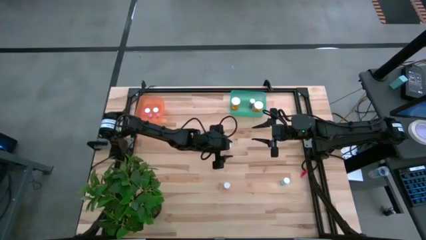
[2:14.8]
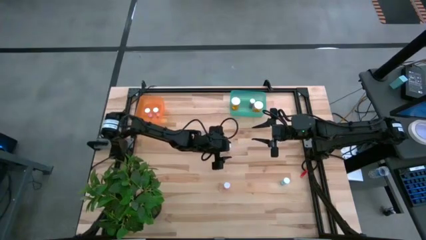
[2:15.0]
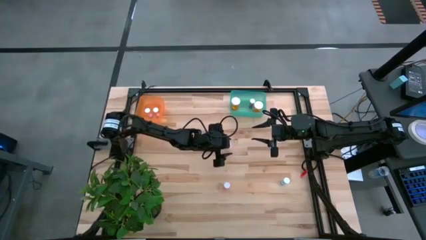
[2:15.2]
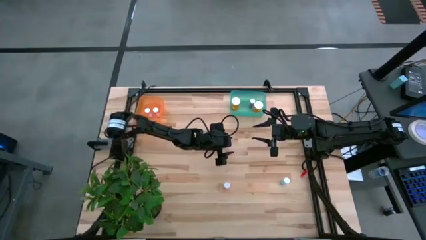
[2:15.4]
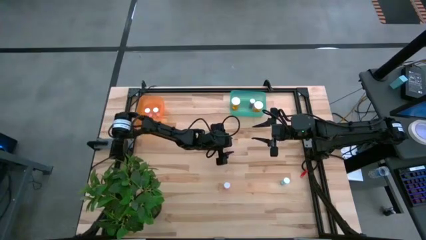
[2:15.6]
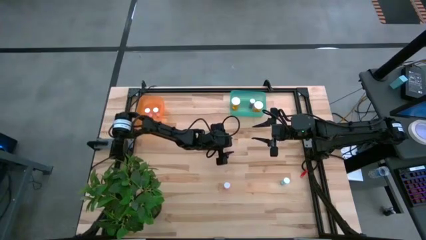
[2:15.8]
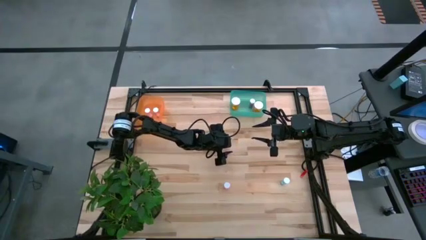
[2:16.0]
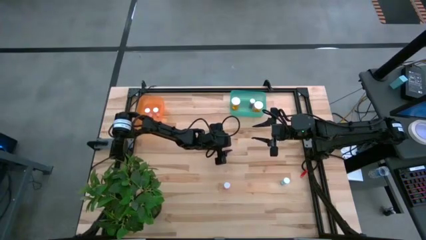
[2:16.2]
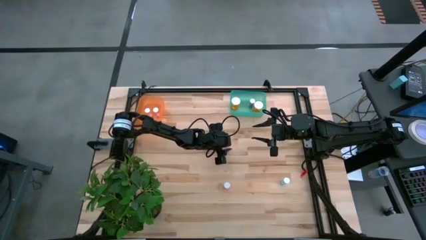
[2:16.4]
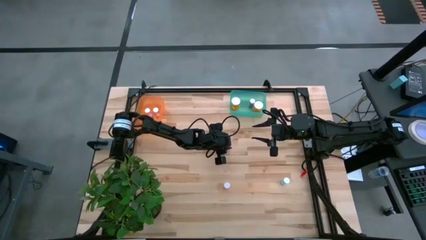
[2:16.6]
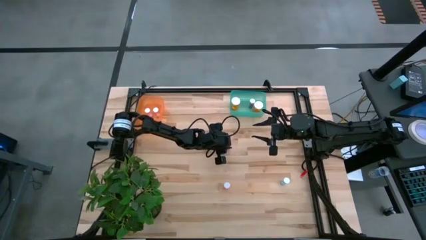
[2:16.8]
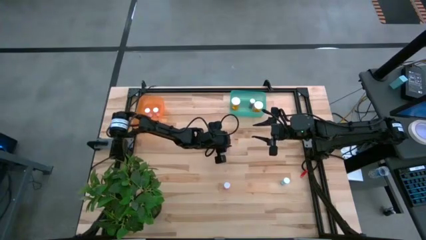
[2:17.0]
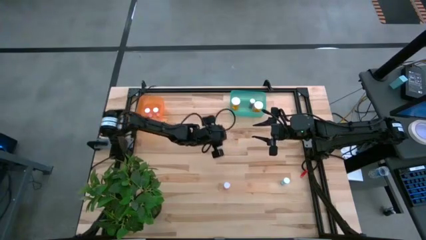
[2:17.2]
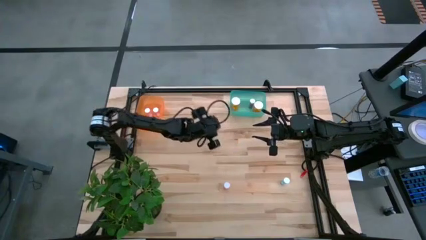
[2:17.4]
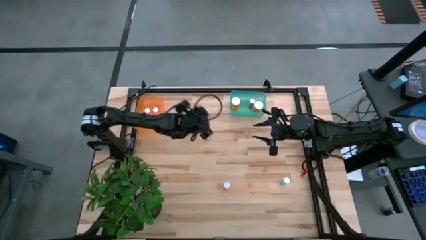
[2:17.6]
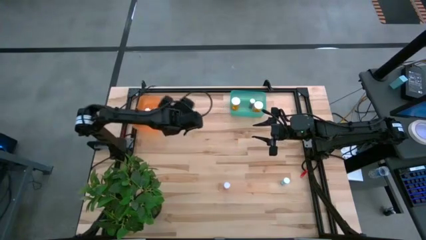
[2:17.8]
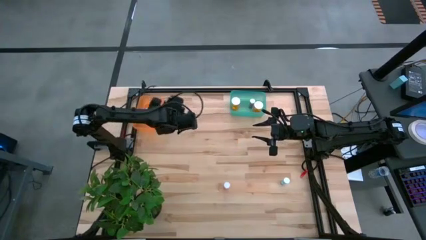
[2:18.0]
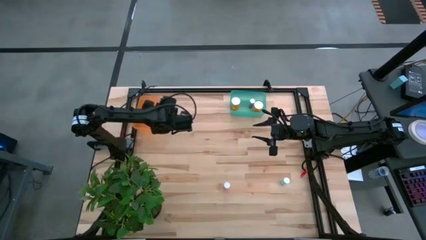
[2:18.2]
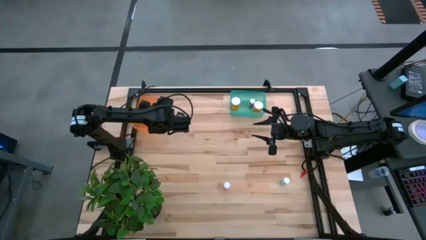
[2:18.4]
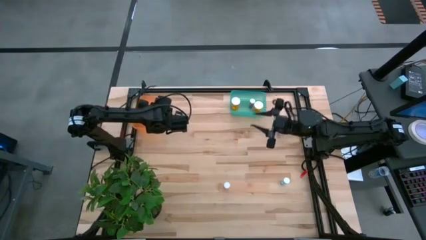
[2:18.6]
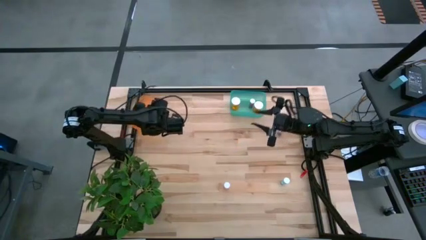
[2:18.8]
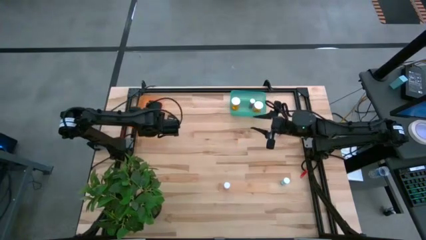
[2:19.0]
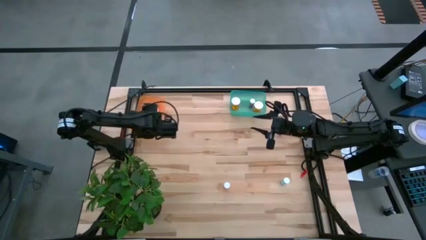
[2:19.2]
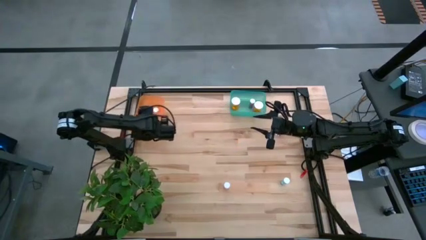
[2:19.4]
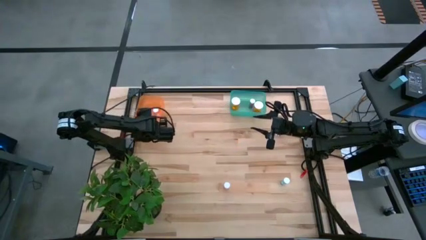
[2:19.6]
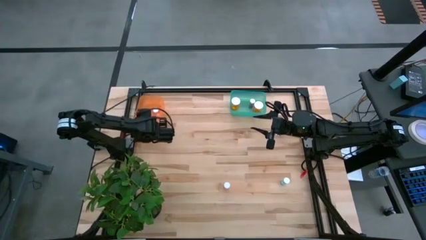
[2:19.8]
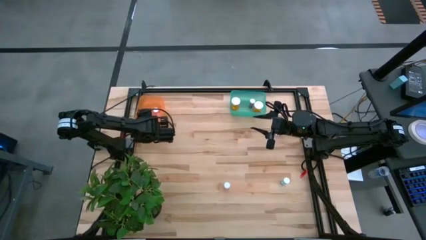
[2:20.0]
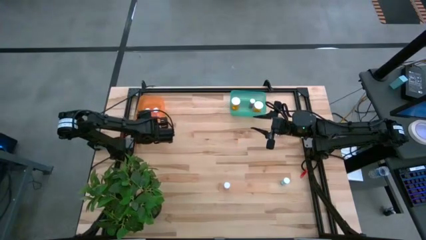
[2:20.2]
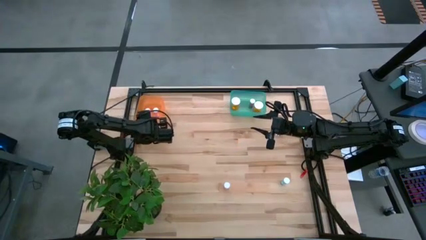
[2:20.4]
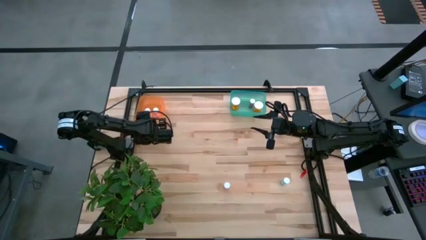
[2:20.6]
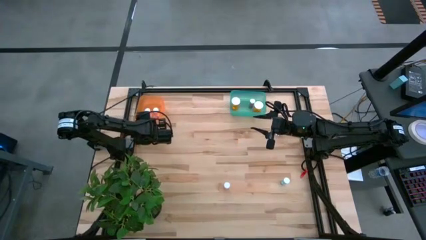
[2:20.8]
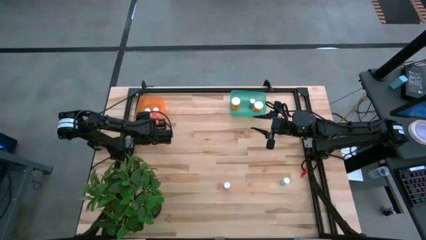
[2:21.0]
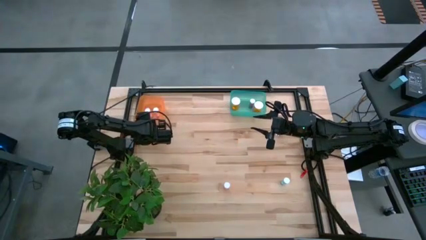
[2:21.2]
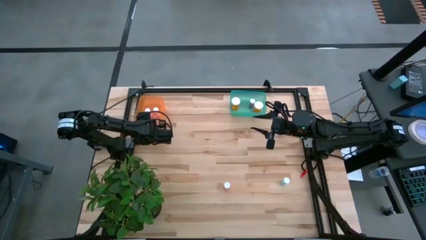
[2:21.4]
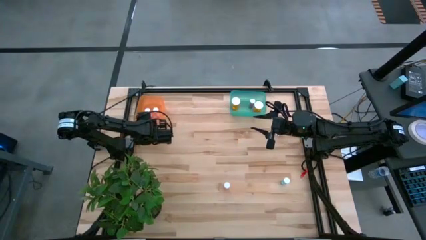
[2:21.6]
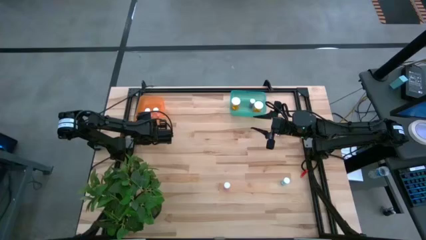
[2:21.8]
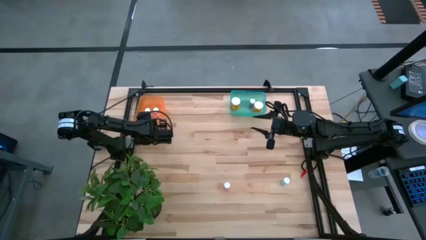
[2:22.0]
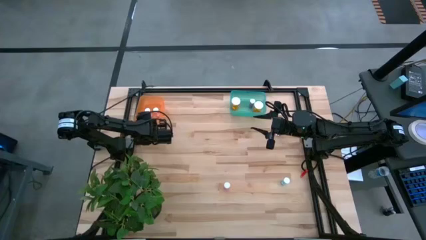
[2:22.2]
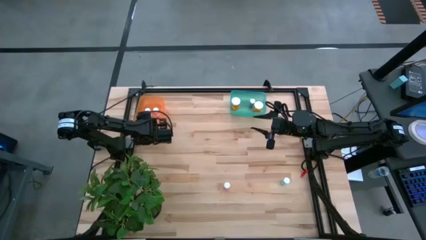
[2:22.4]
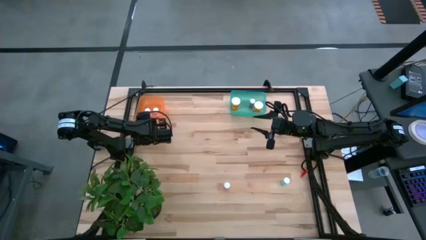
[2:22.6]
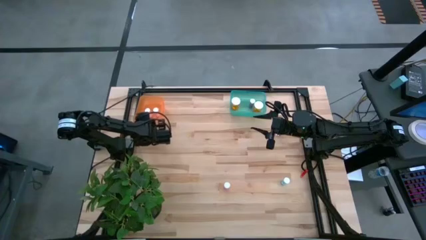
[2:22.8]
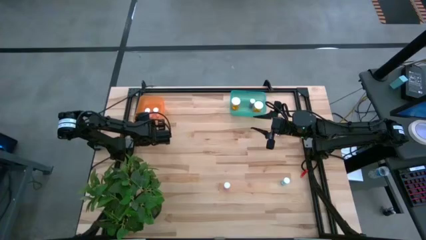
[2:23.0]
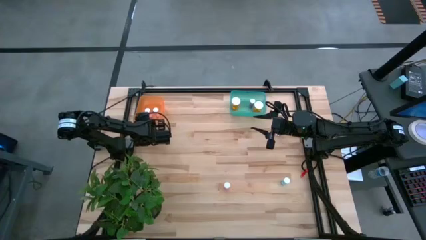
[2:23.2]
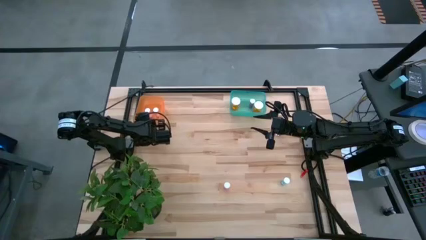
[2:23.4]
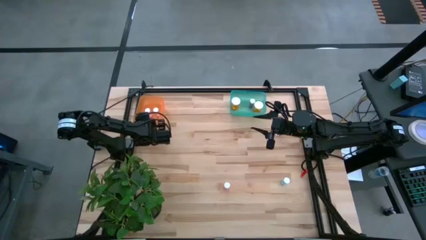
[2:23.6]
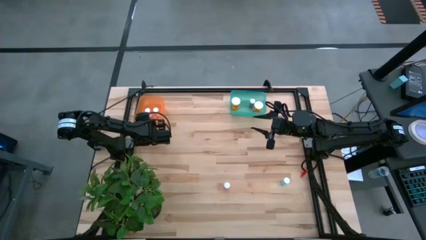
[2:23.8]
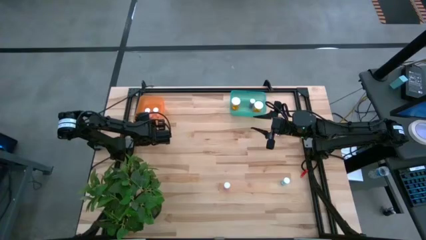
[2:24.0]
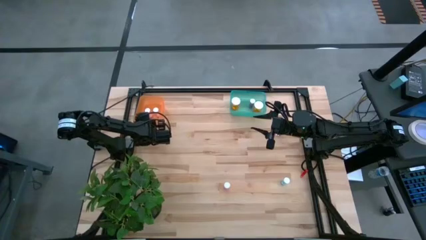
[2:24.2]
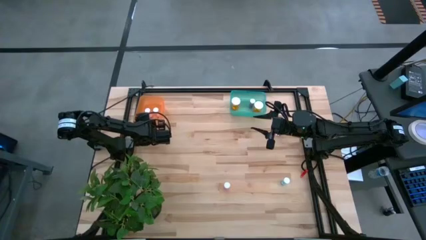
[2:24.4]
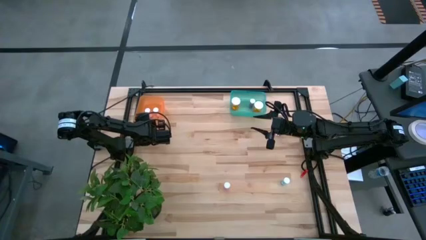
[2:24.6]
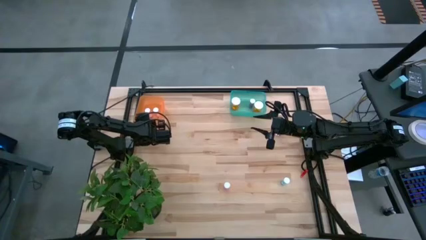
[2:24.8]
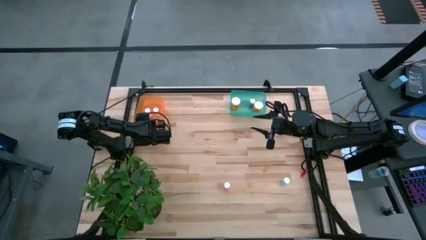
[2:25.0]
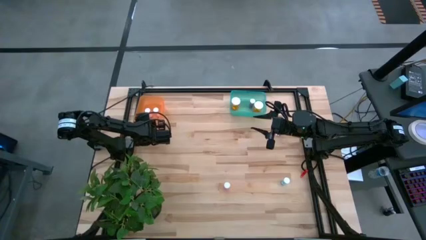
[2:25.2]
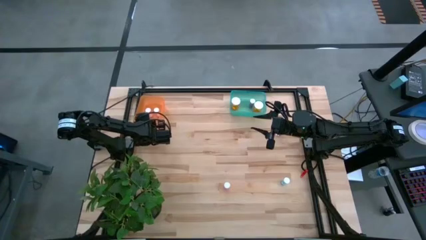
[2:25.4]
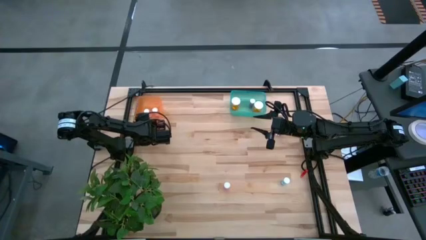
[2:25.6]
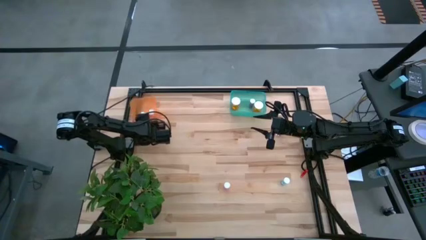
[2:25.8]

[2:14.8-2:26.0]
Task: Pick and place medicine bottles into bin by pill shape (circle, oval)
Put the pink tablet bottle into the orange bin

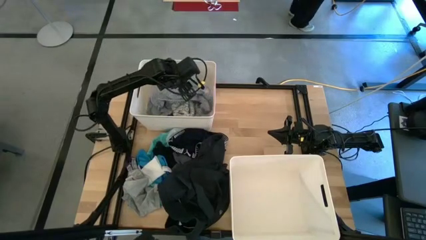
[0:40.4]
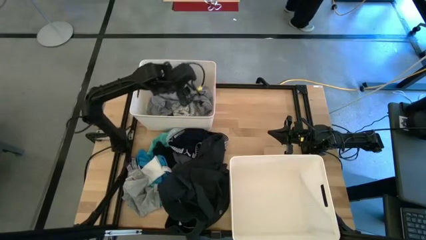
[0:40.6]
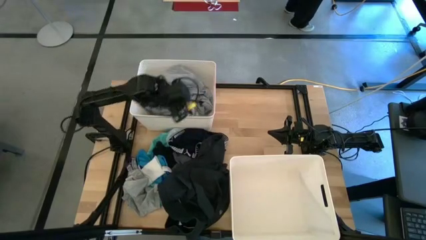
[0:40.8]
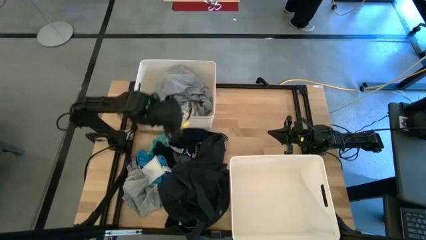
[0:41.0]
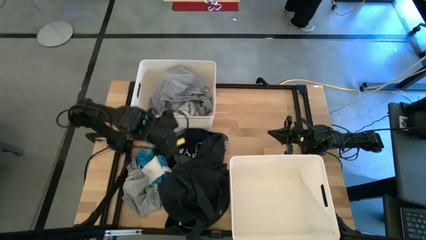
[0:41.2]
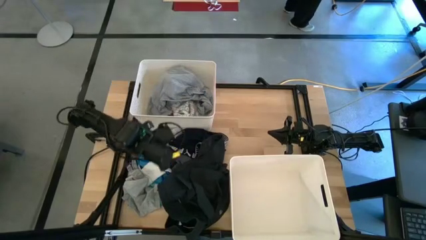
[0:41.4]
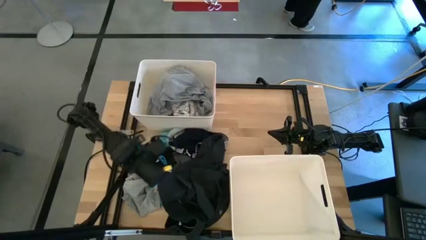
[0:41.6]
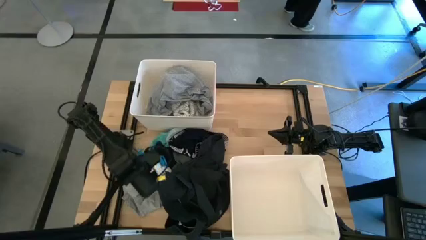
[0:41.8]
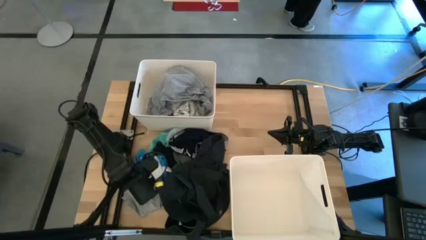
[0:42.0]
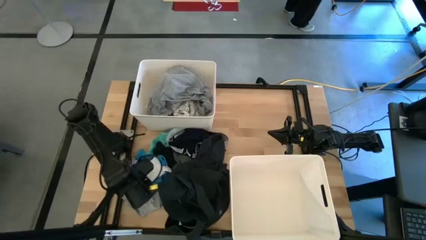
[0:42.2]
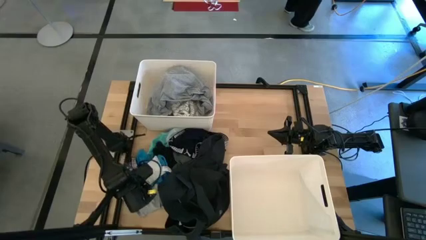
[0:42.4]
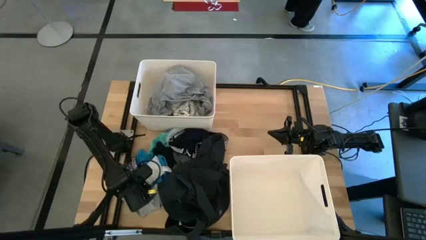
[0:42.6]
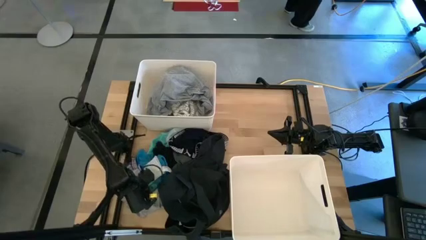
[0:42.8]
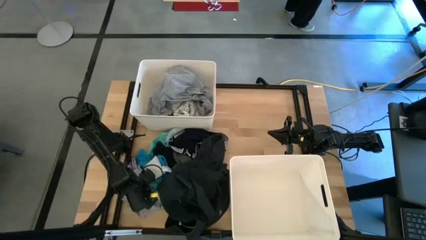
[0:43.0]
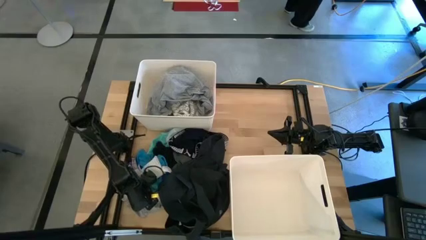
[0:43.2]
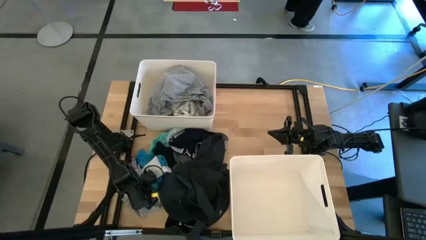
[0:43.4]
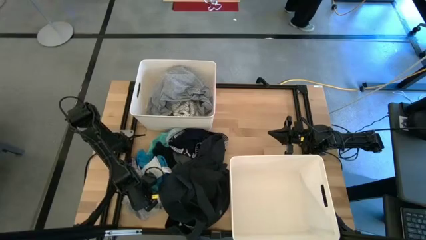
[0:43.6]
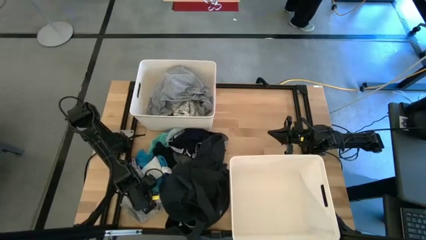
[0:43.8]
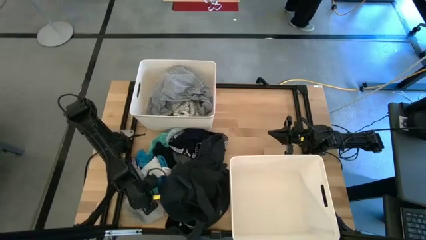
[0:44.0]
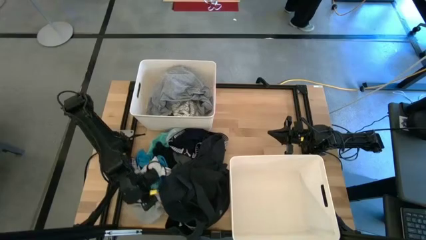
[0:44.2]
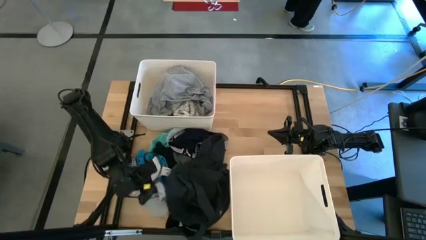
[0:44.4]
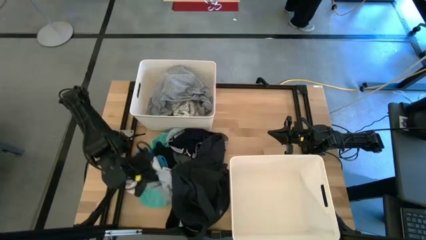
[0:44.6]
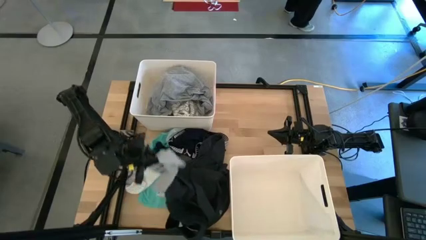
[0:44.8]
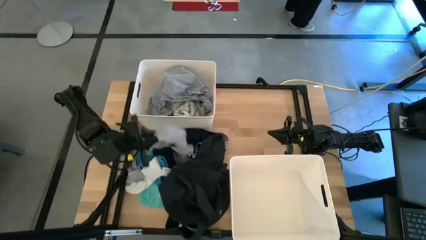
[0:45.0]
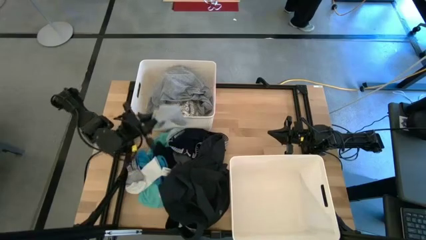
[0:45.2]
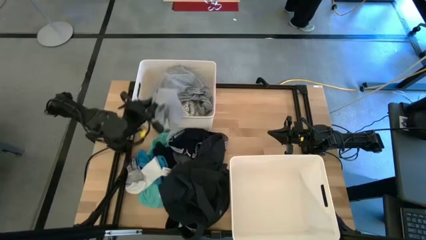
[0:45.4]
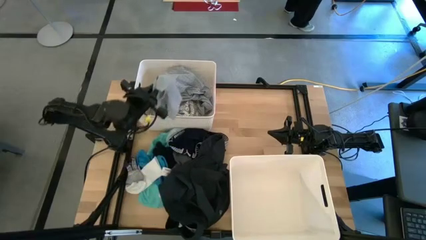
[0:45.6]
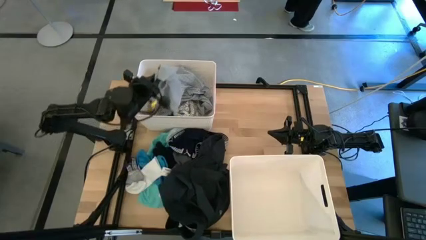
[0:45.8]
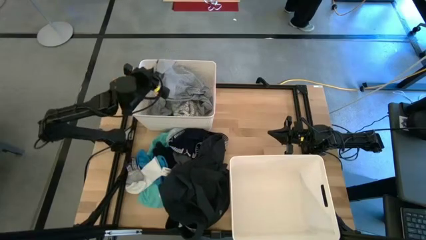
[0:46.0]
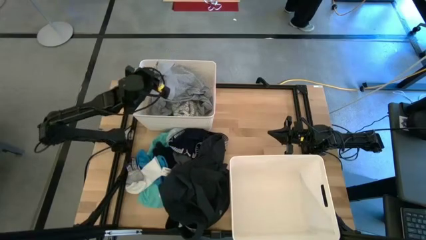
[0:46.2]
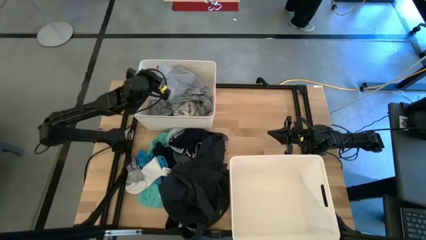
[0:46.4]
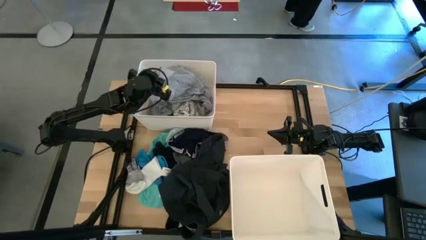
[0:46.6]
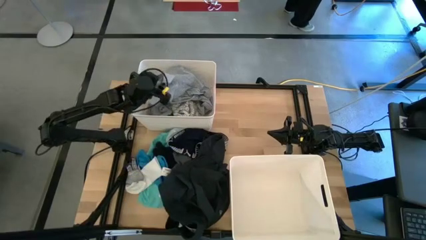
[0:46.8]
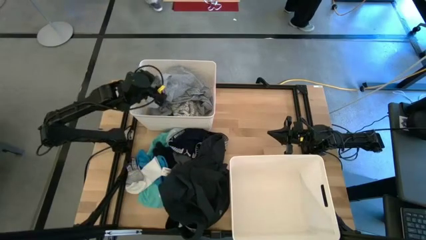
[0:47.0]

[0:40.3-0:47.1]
Task: Sort clothes
Put the gray boxer into the top left laundry bin
